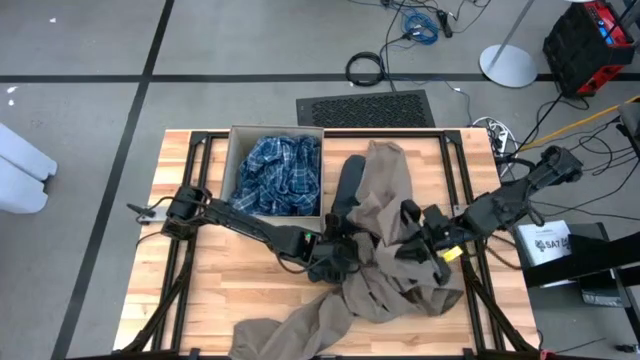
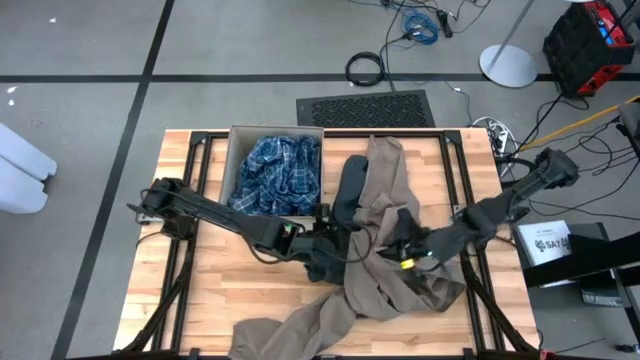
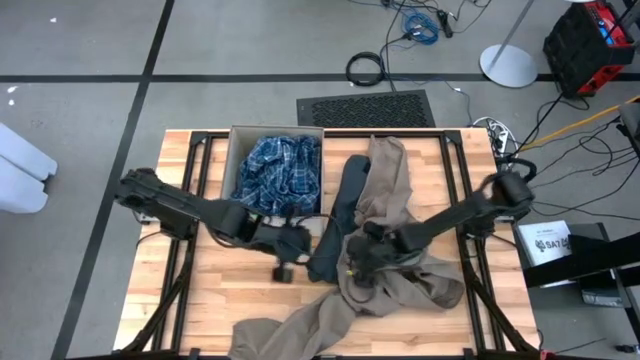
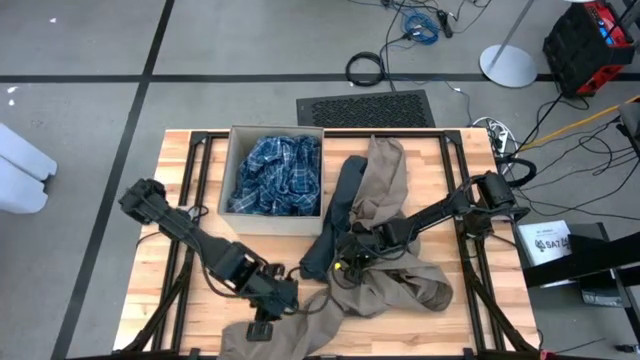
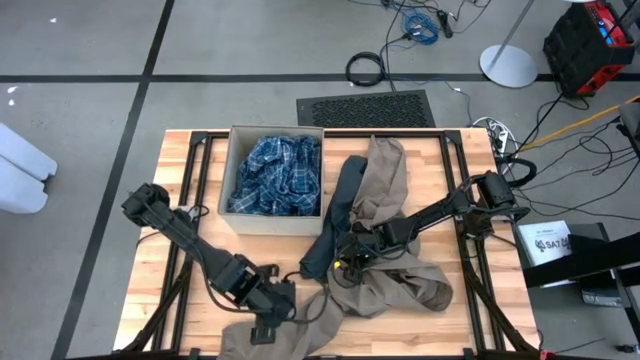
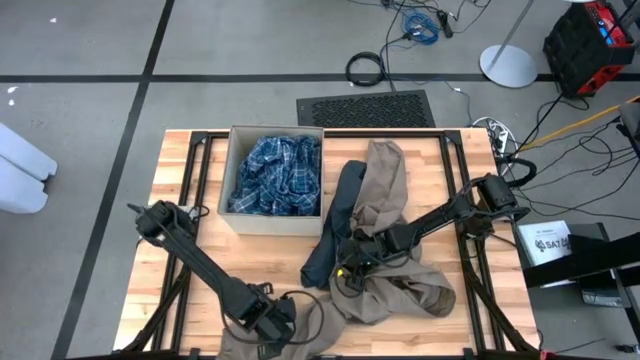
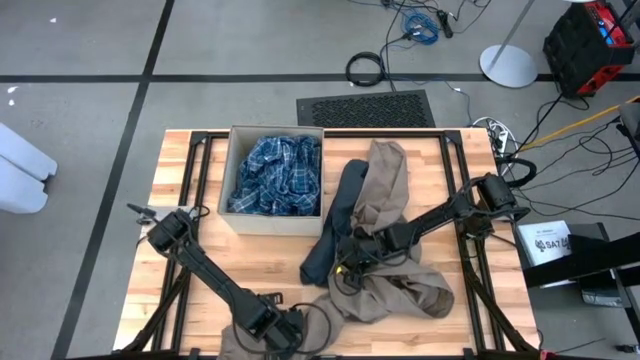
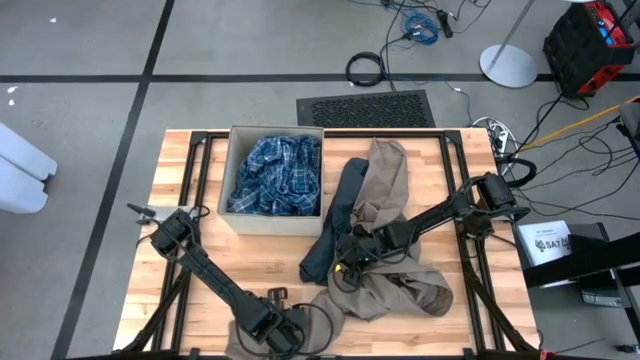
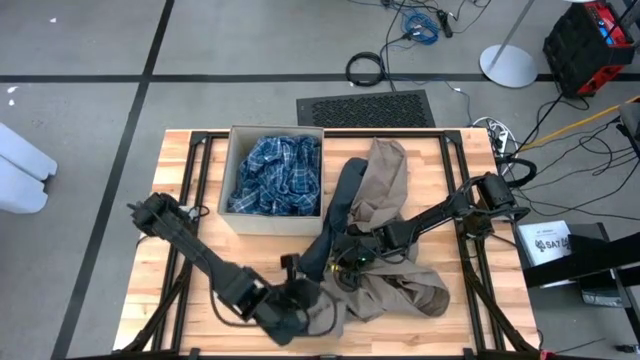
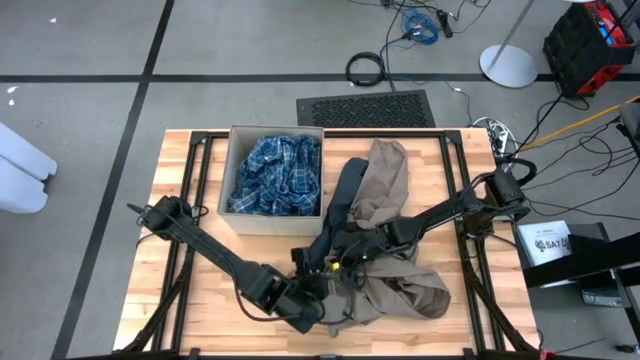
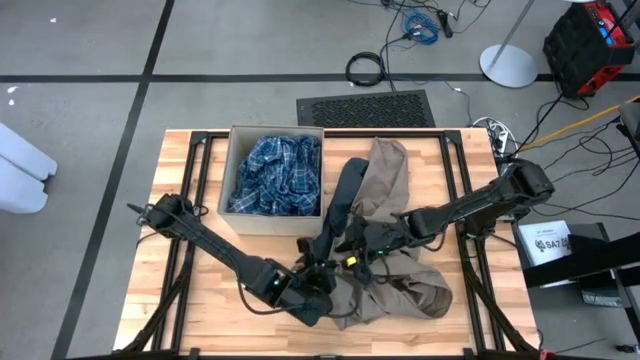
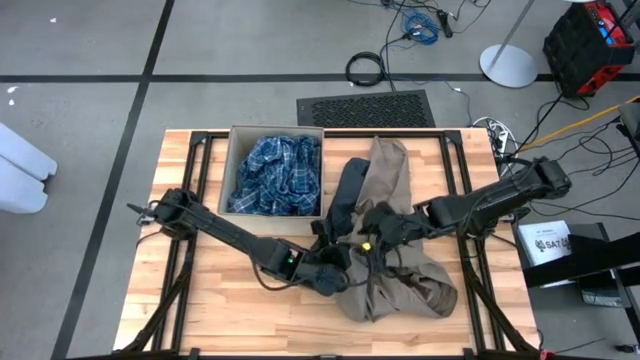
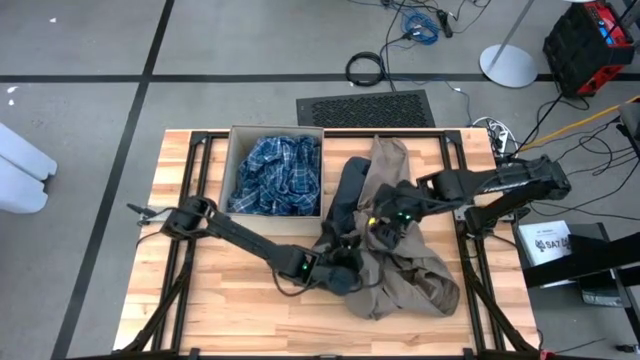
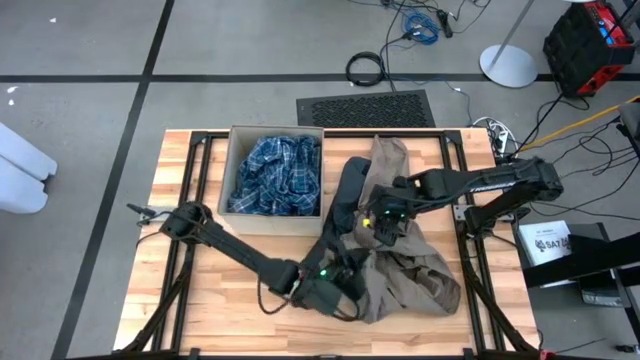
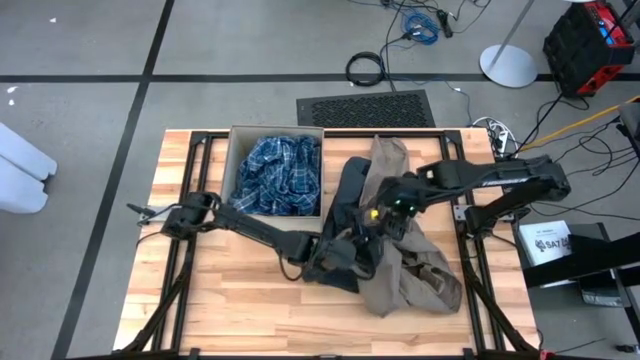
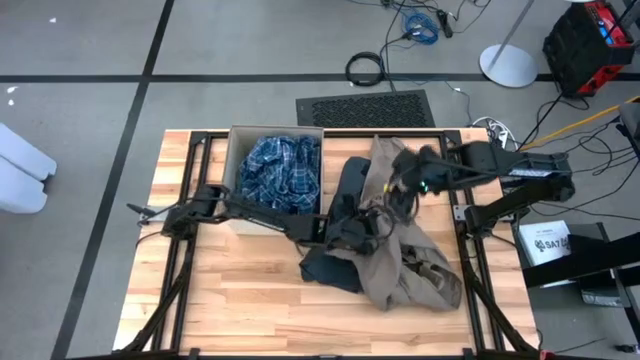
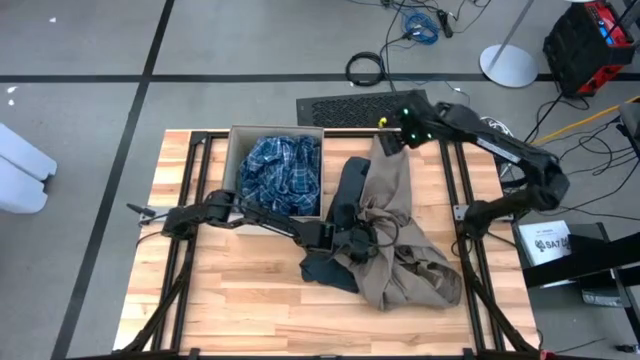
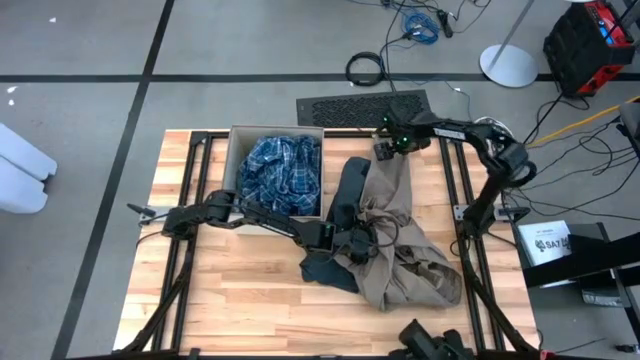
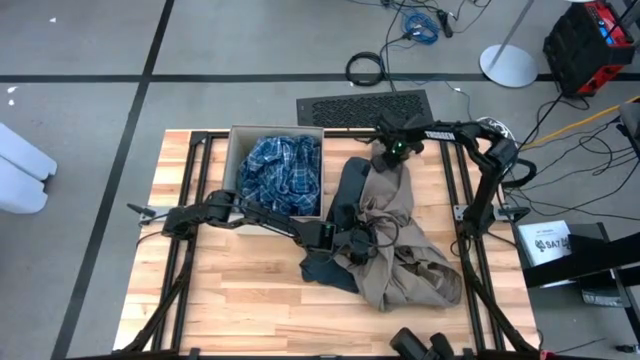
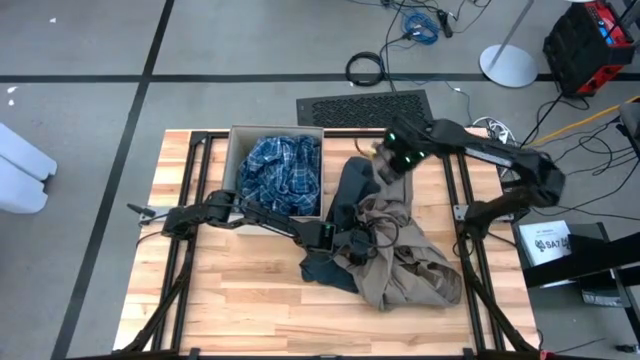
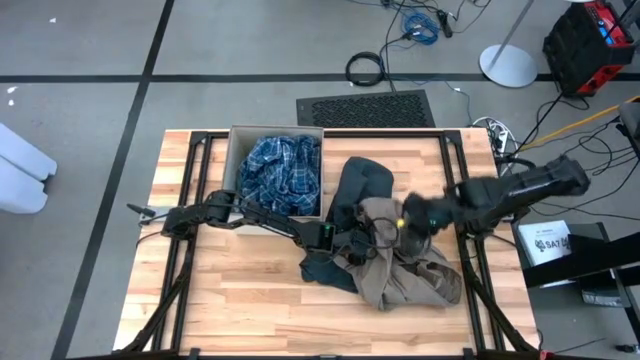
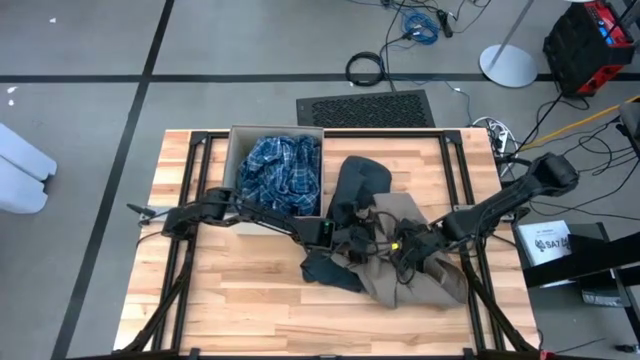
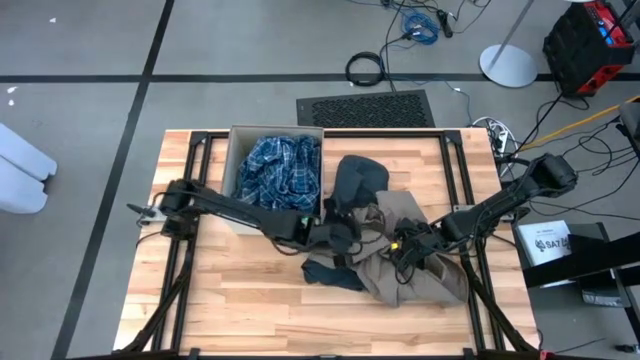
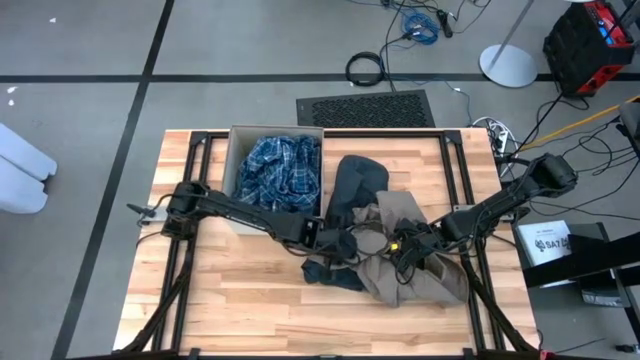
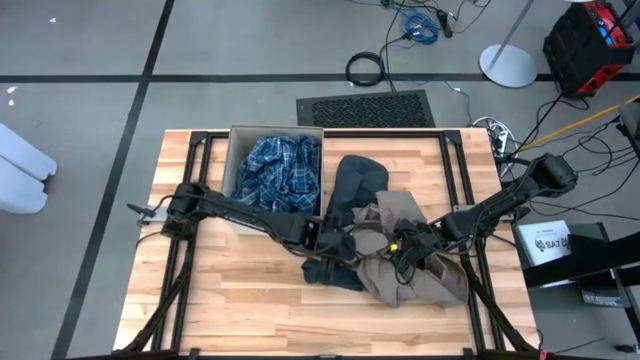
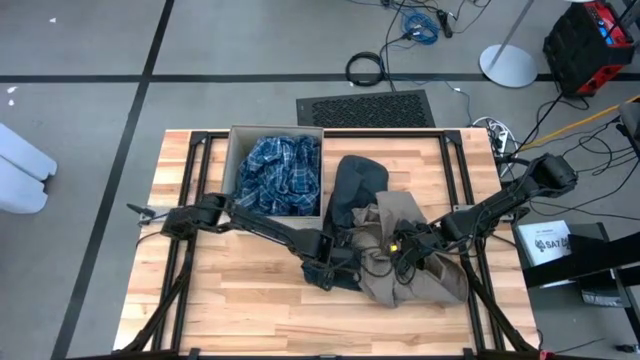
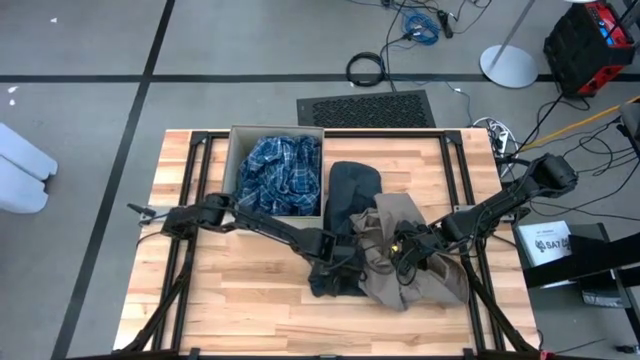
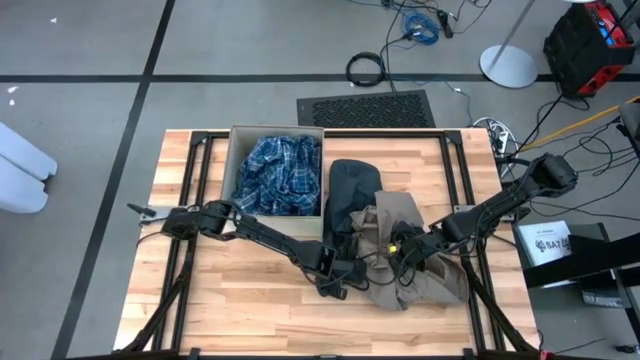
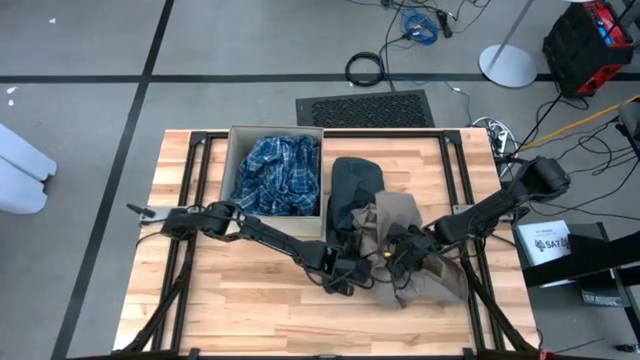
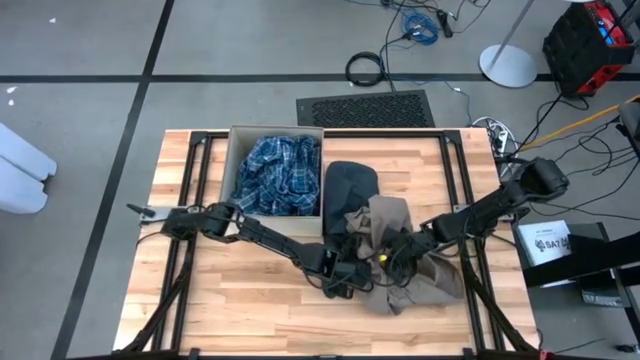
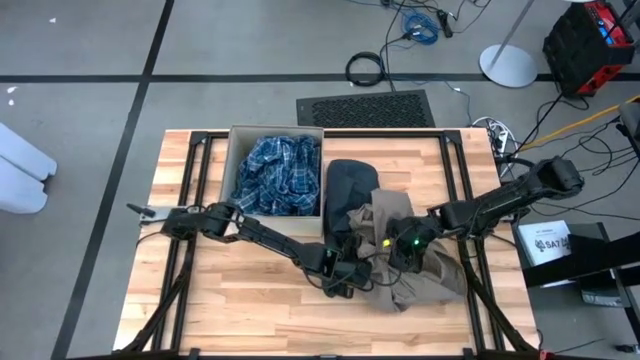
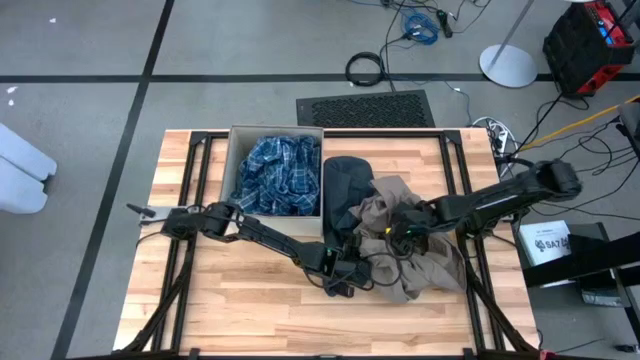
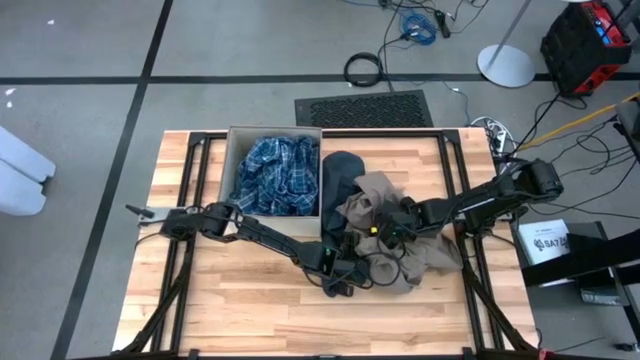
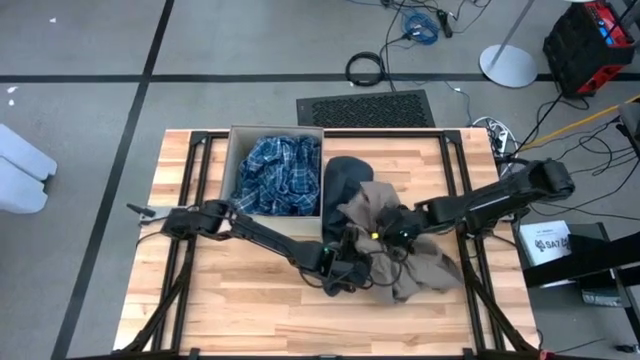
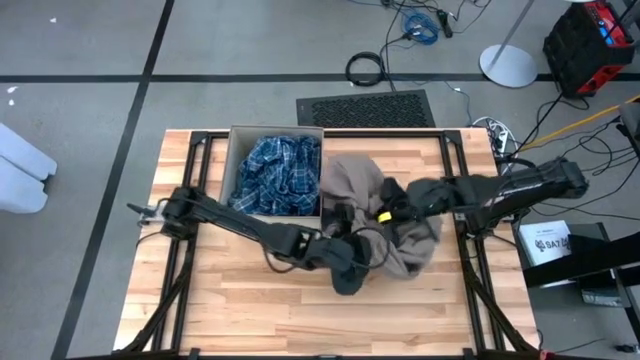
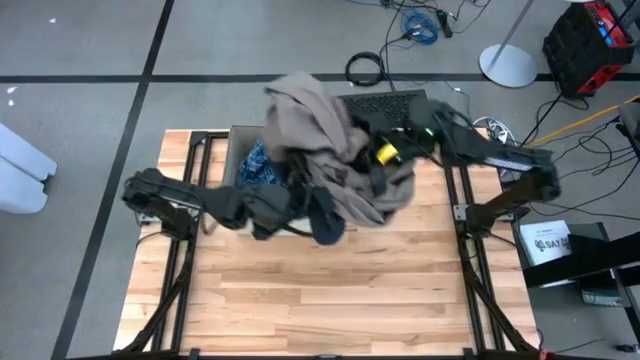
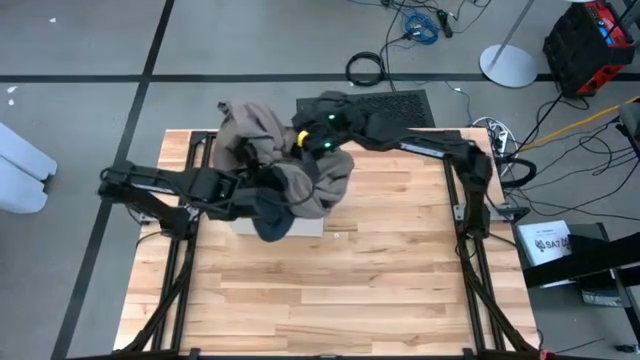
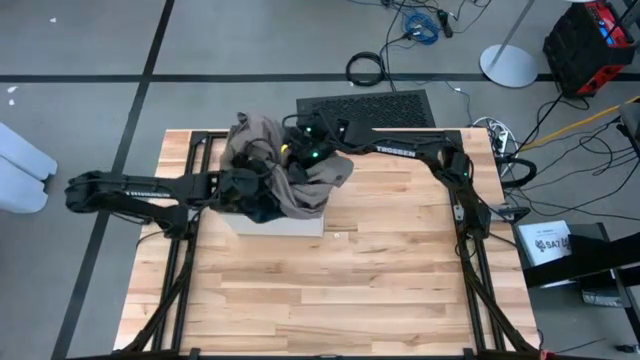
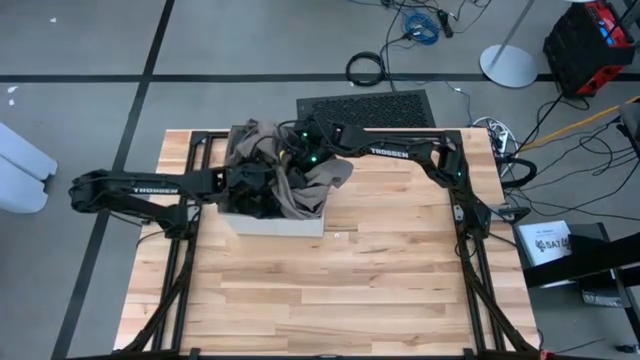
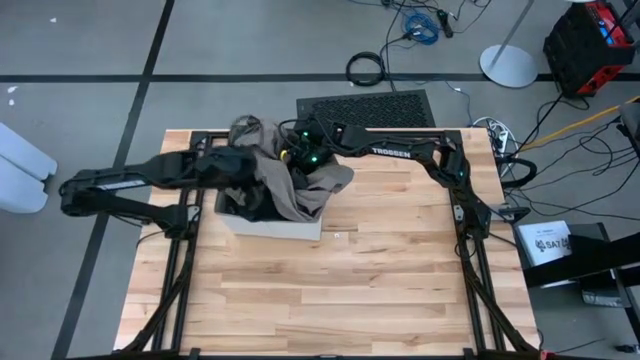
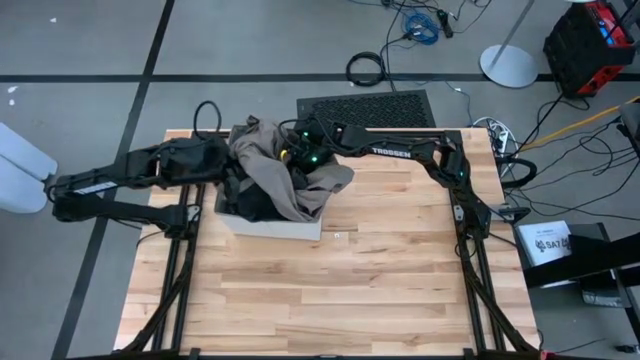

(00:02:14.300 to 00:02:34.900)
Task: Sort clothes
Put the brown jacket into the white laundry bin
